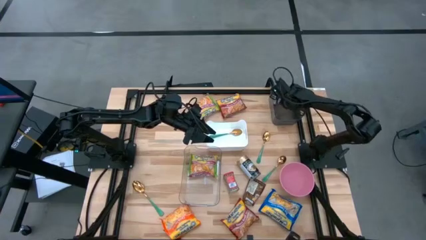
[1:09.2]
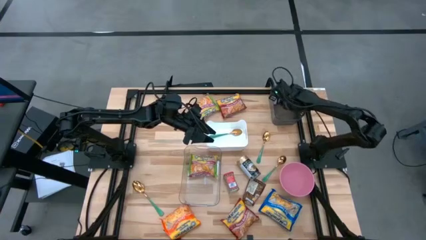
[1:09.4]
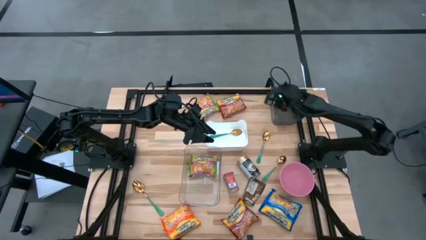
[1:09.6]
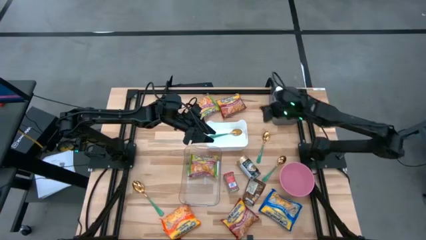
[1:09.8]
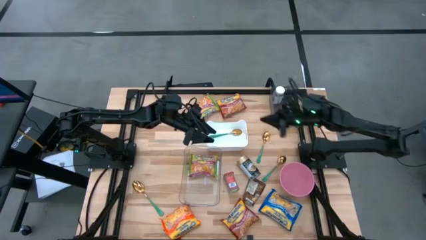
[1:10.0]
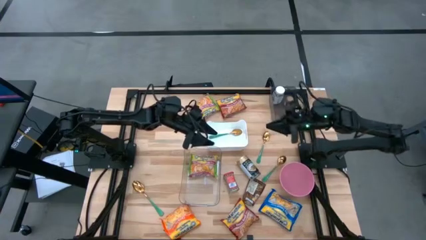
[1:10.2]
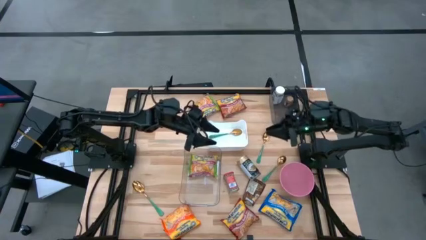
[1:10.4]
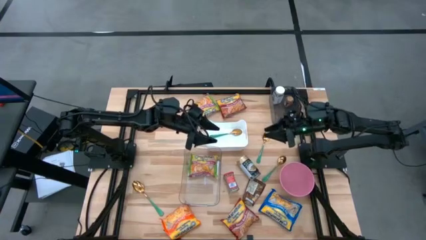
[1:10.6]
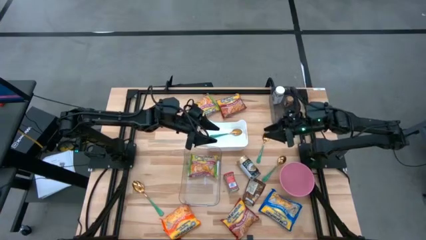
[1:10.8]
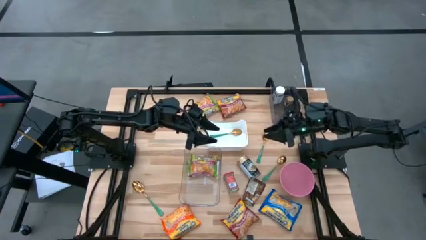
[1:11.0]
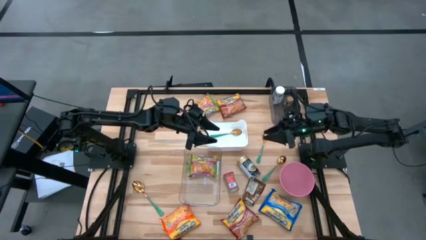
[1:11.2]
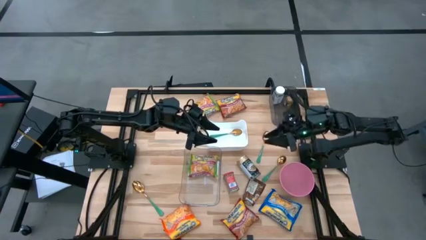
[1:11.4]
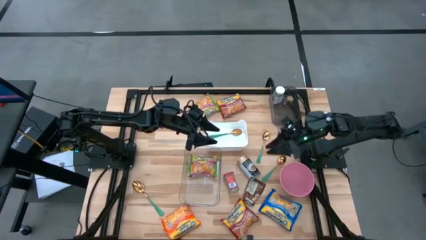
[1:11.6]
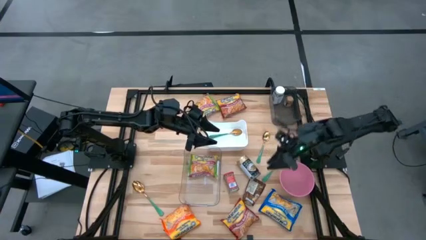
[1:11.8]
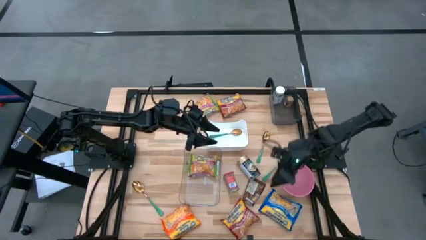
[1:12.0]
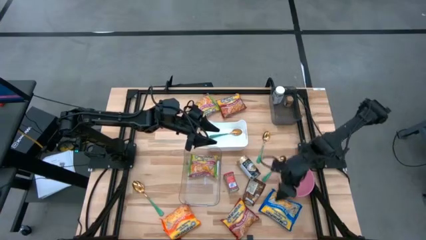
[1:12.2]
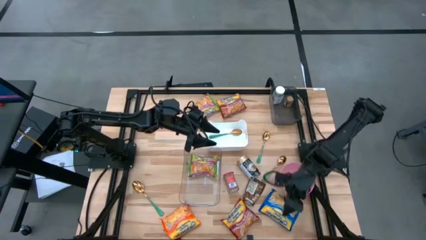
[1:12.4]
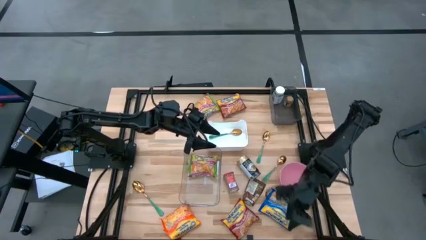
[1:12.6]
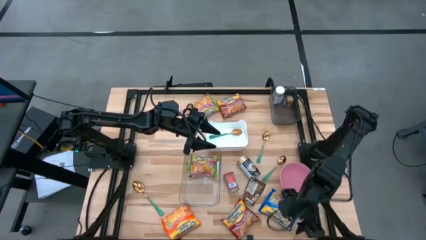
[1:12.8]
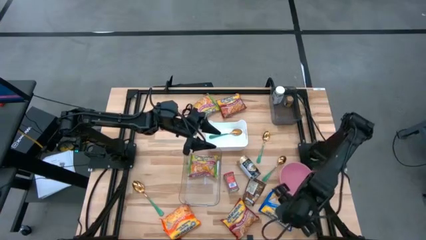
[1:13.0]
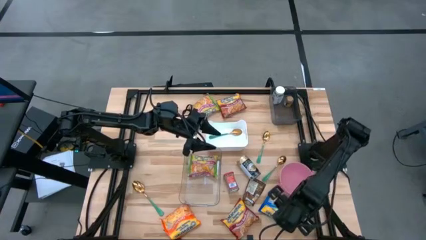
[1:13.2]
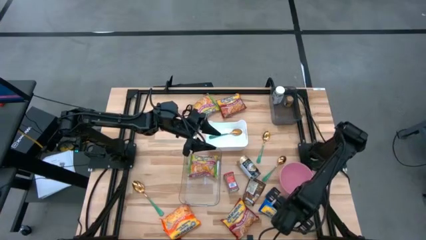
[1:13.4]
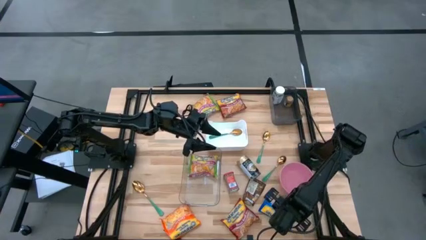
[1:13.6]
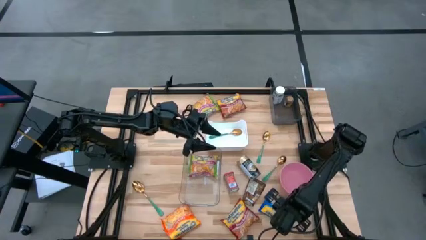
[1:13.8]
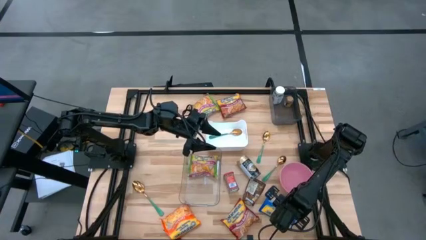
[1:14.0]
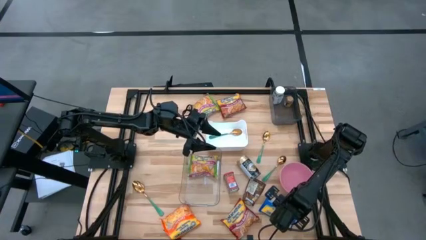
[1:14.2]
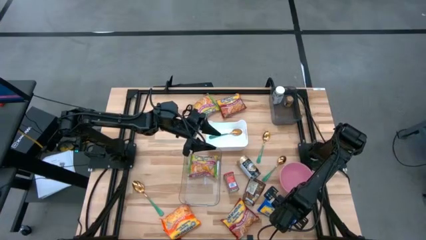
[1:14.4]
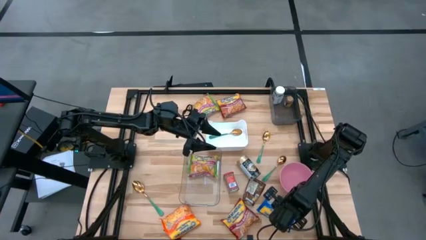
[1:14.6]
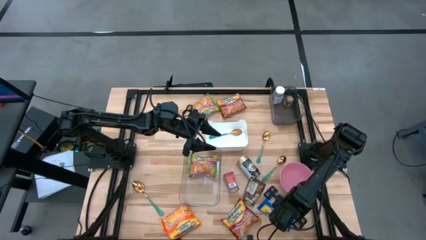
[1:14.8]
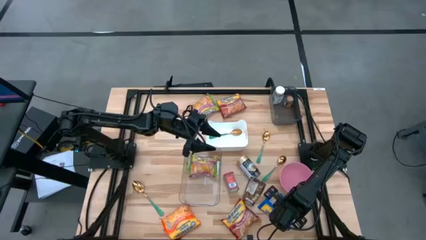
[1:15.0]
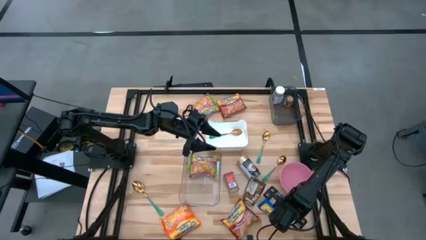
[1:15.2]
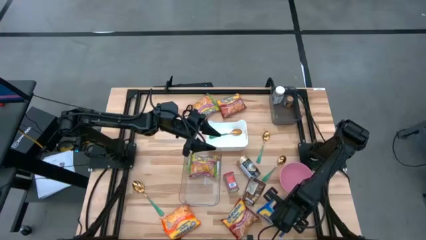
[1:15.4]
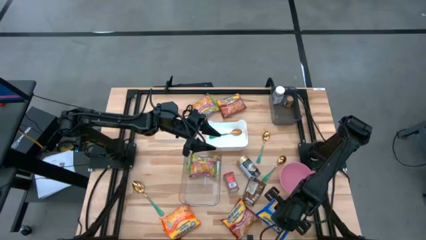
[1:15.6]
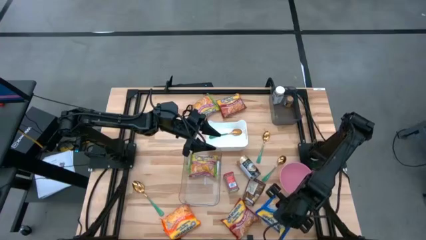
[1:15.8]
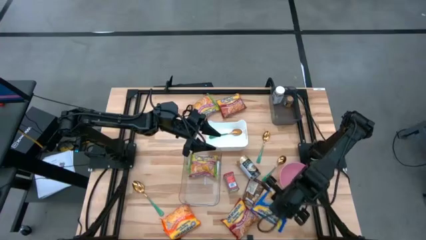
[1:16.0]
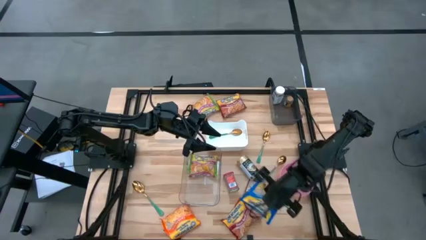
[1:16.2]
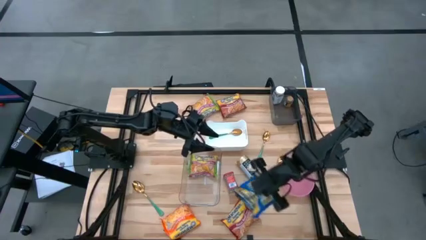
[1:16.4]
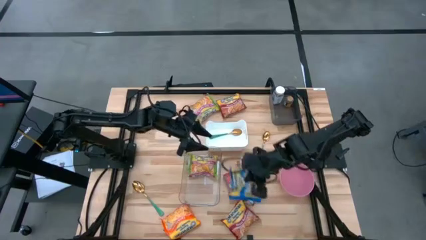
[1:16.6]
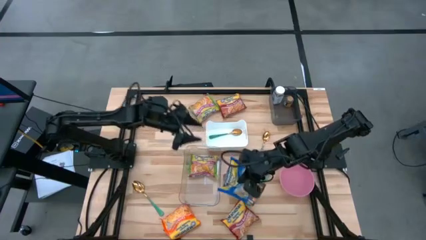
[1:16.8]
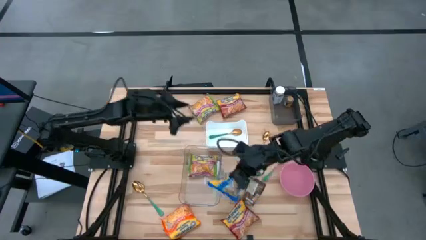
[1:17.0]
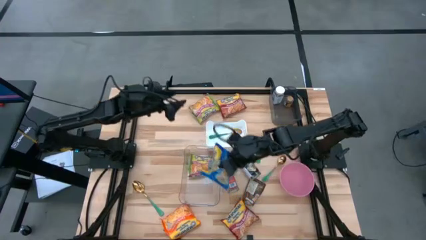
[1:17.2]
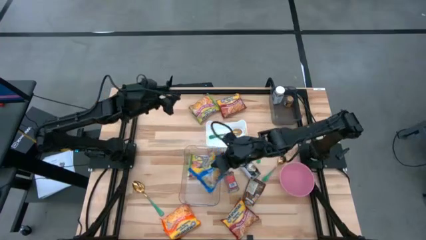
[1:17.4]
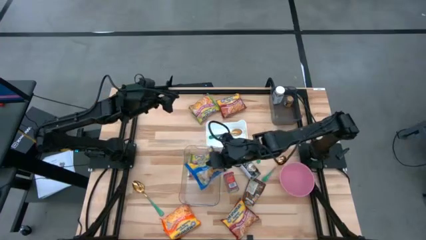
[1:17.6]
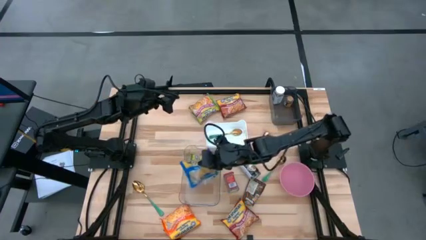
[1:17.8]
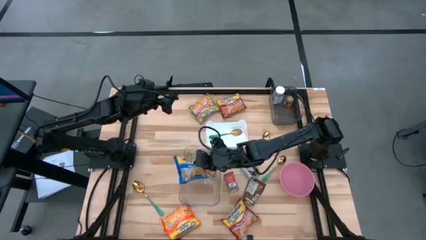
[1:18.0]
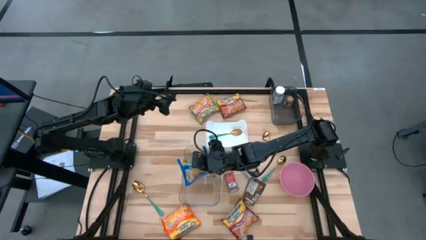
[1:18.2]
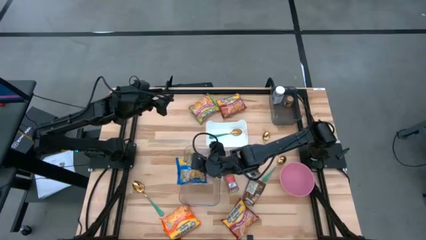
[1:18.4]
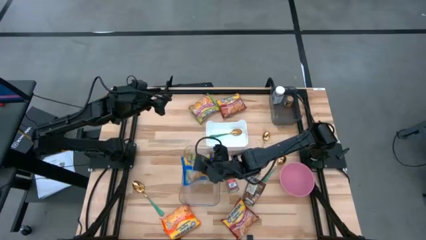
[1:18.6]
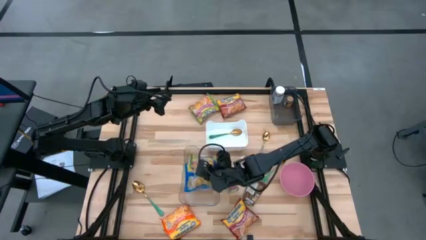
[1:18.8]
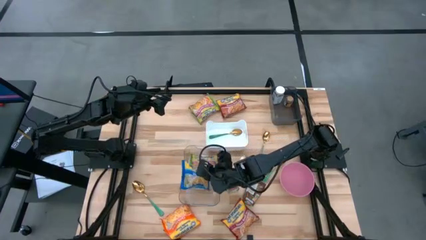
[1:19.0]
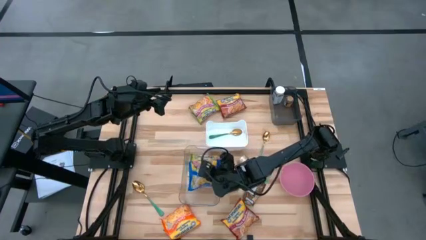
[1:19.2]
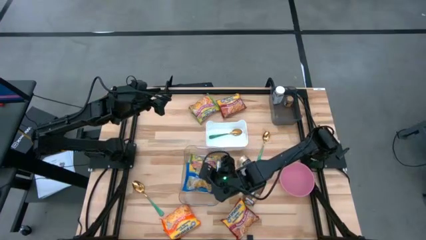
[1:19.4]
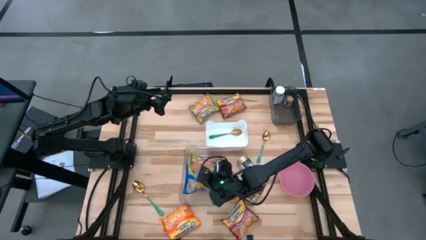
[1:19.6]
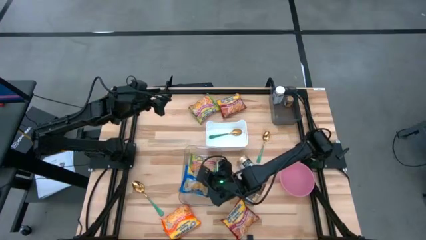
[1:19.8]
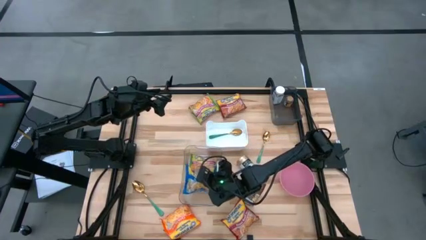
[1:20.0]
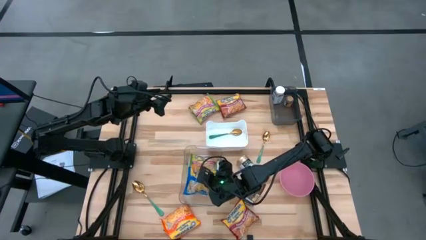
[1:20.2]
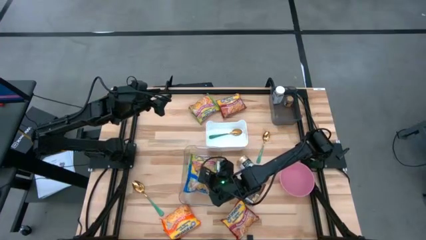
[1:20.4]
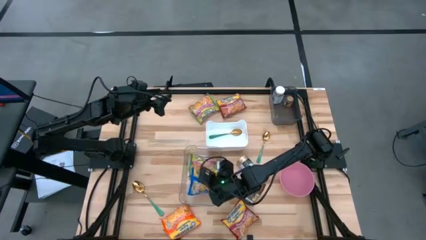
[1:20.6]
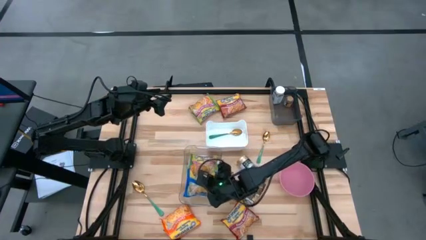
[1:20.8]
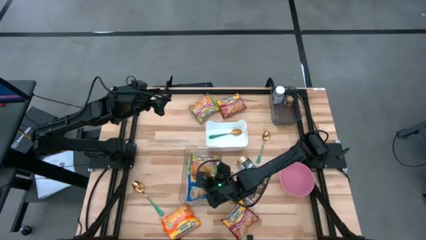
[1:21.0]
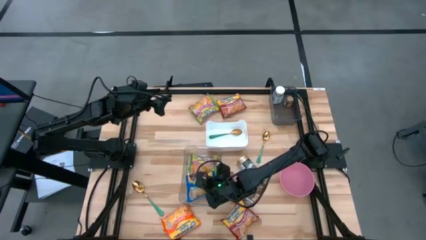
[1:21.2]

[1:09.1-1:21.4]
Task: Pick & Place Food Item
Put the blue noodle pack into the transparent bin
